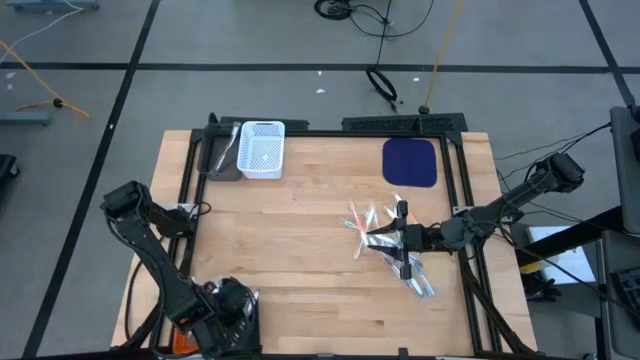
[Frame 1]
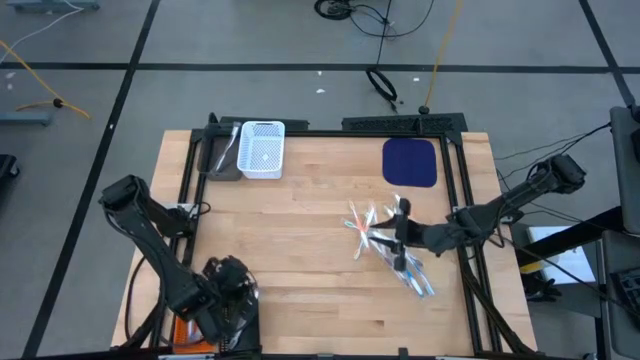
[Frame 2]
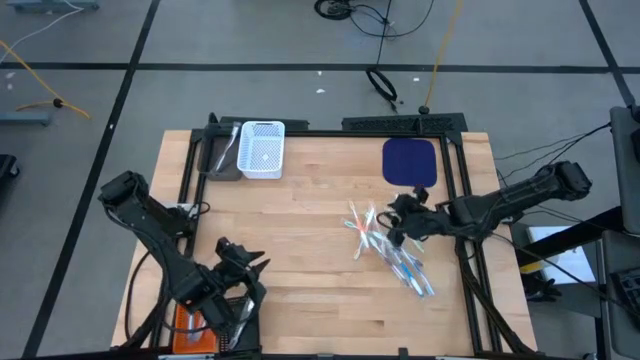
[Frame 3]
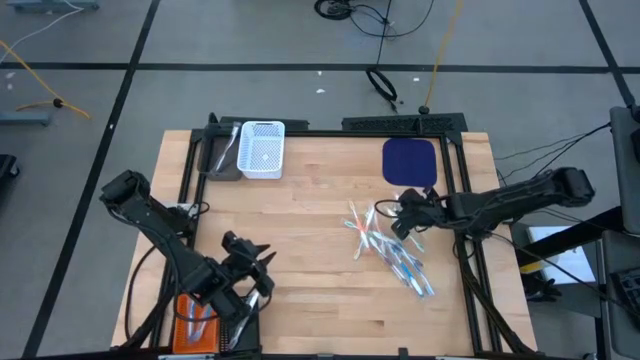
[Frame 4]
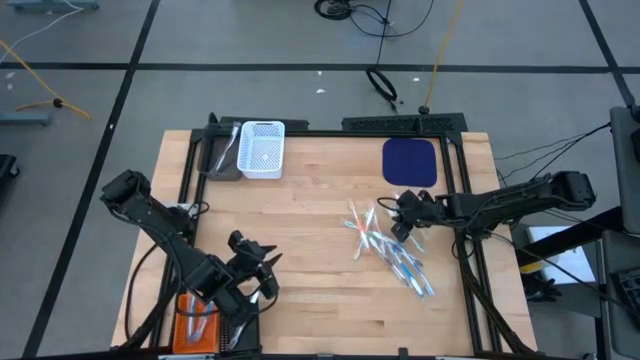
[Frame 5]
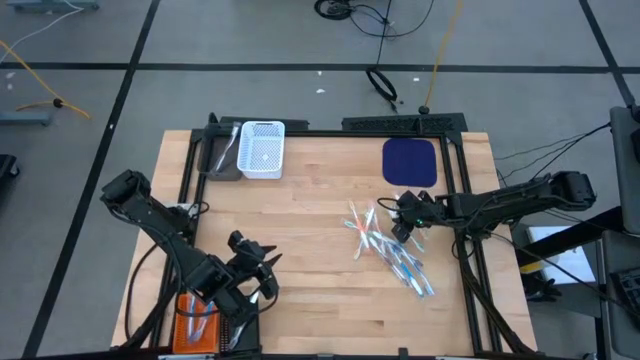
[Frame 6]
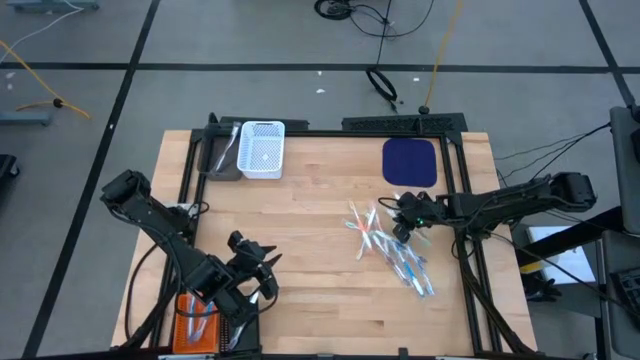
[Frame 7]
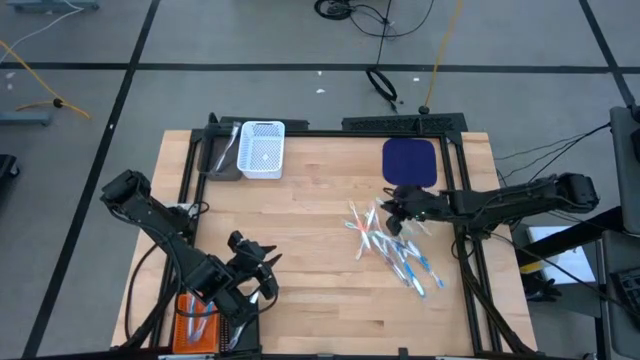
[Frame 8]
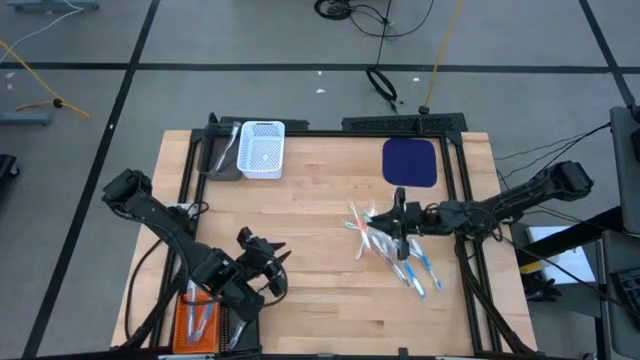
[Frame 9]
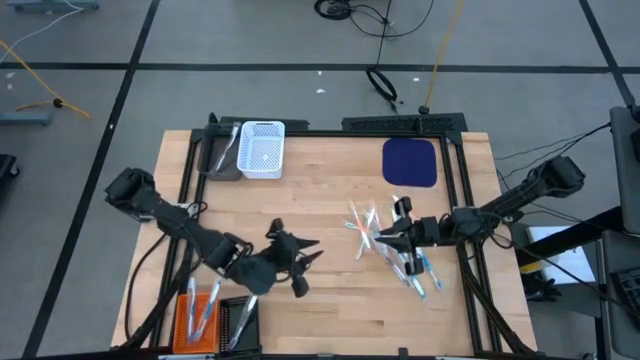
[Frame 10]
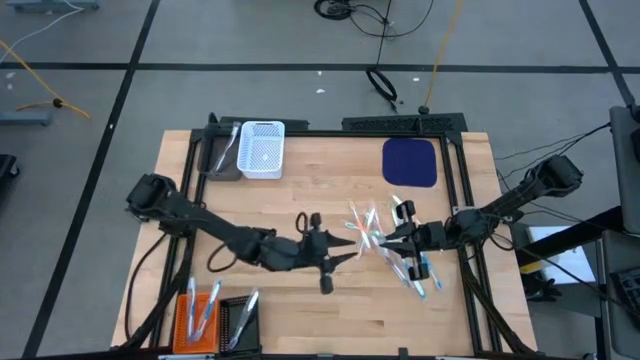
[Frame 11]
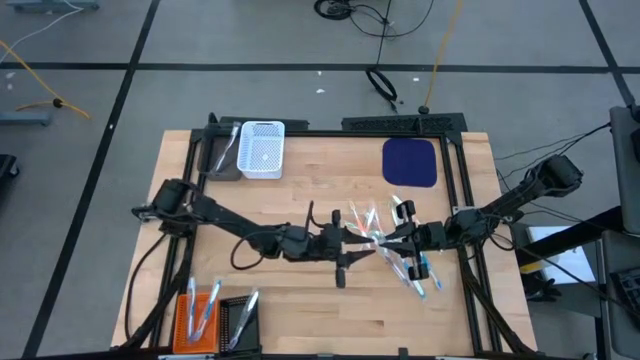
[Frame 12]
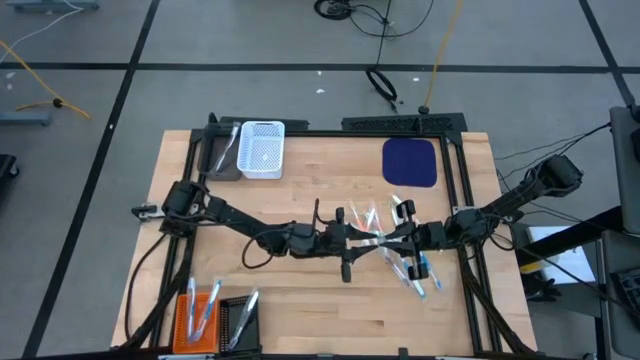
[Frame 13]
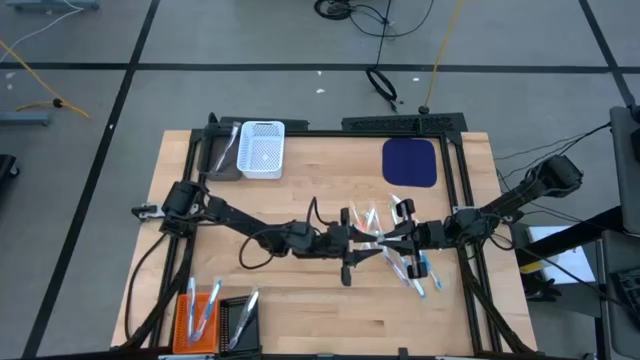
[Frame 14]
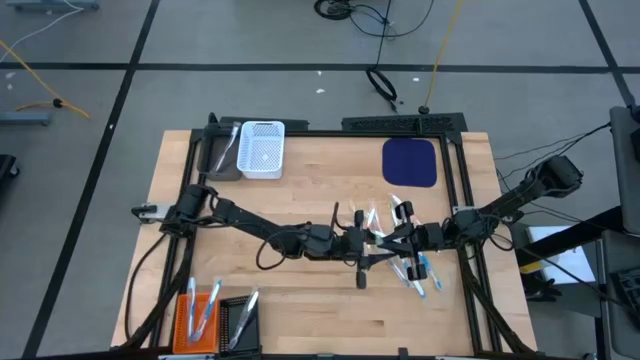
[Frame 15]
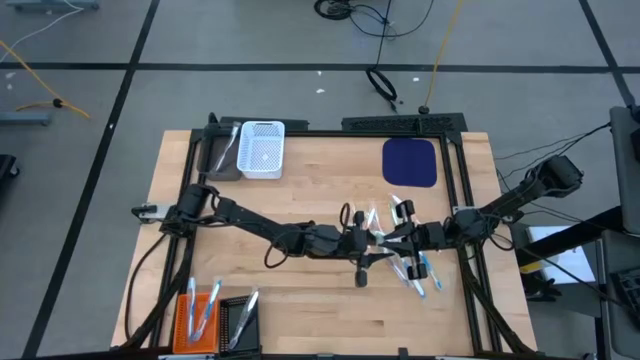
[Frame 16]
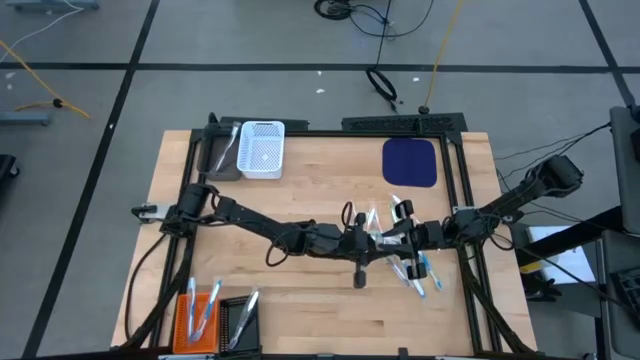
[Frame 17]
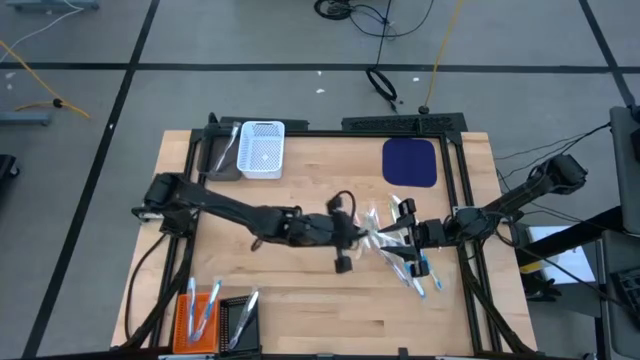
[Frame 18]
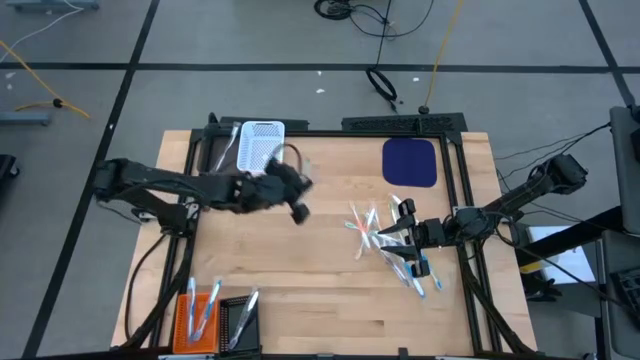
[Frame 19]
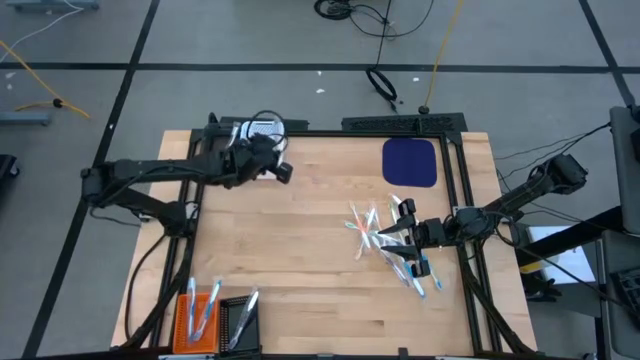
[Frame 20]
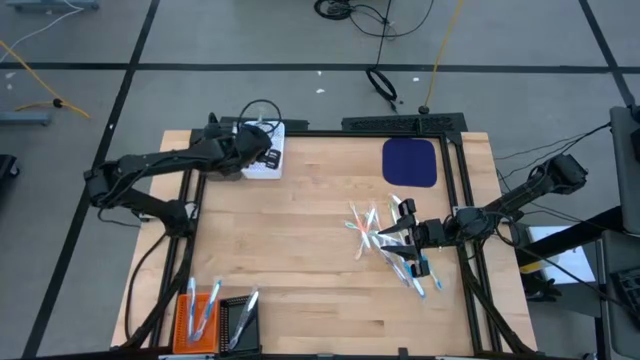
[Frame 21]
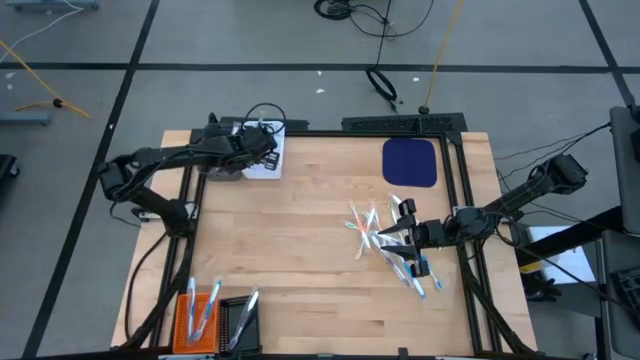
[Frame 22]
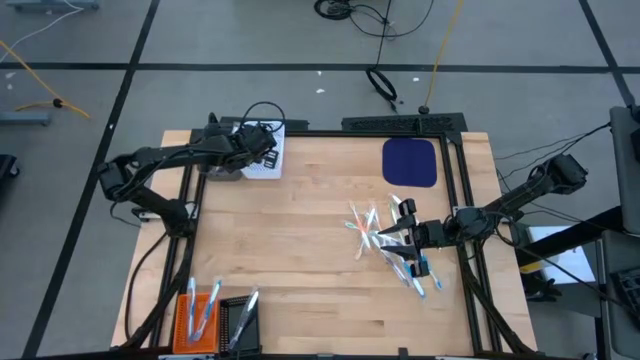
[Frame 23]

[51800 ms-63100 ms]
Task: Pick & Place Toothbrushes
Put the green toothbrush into the white bin

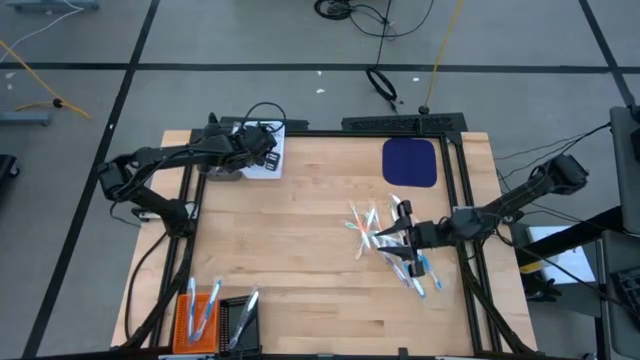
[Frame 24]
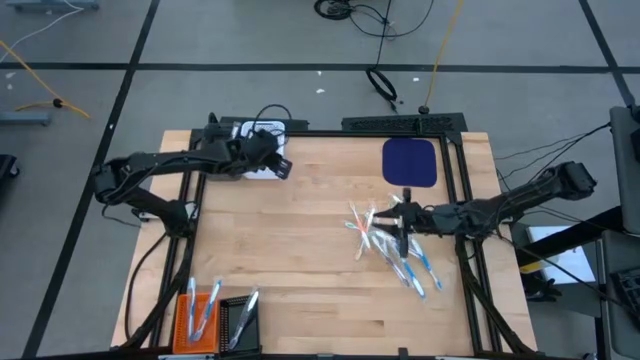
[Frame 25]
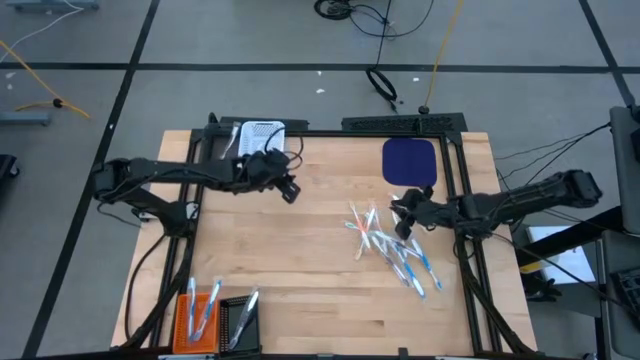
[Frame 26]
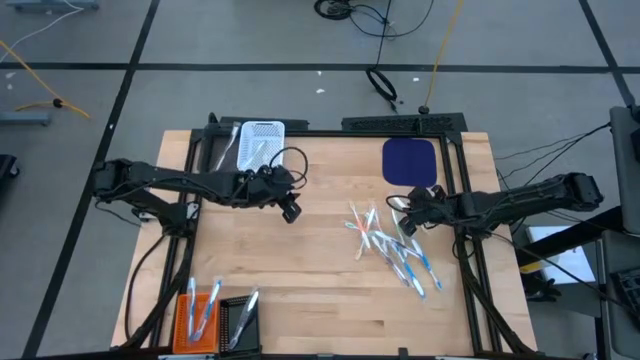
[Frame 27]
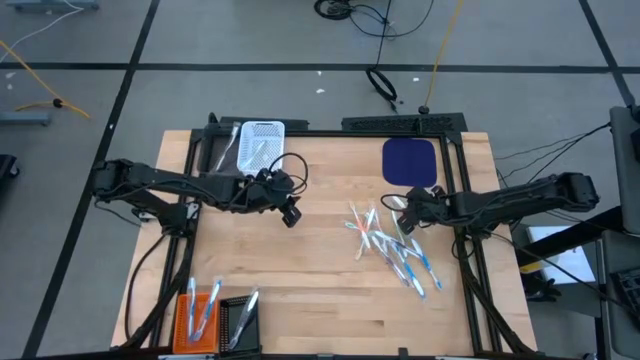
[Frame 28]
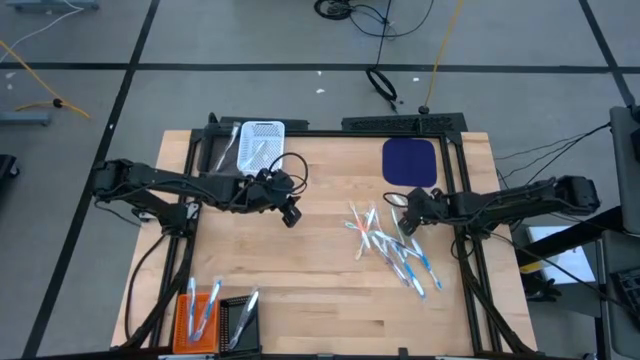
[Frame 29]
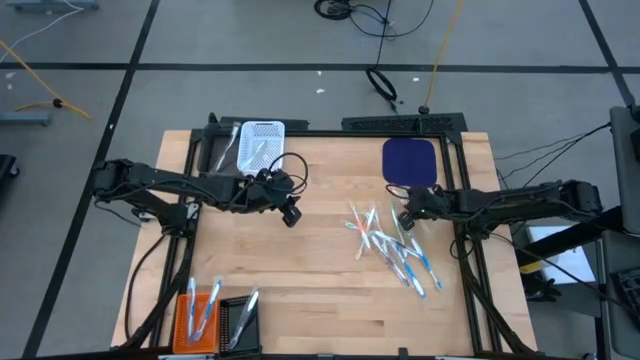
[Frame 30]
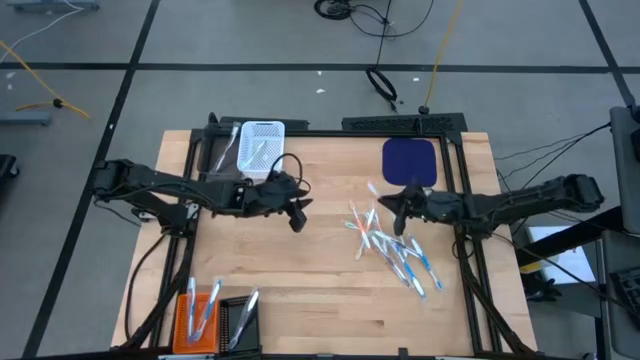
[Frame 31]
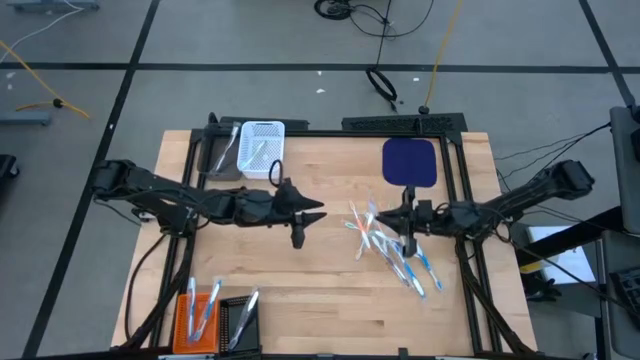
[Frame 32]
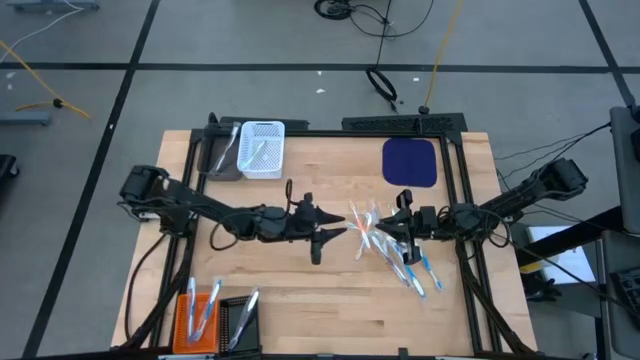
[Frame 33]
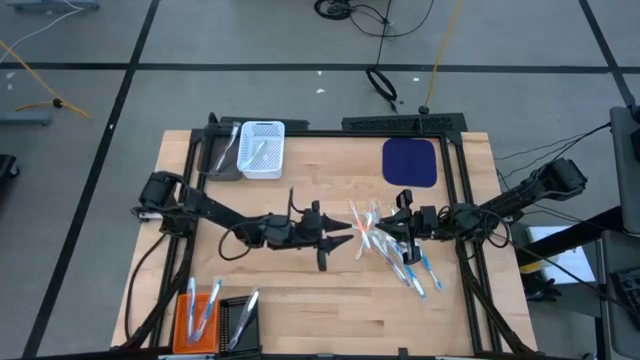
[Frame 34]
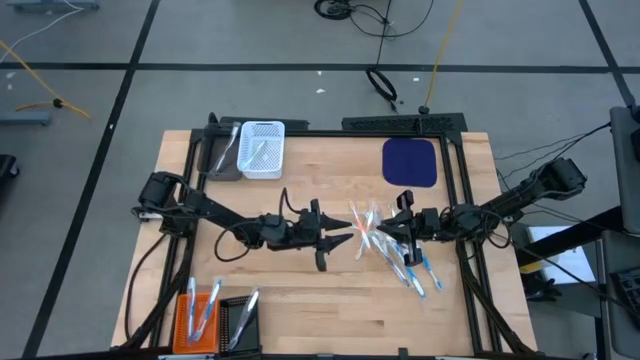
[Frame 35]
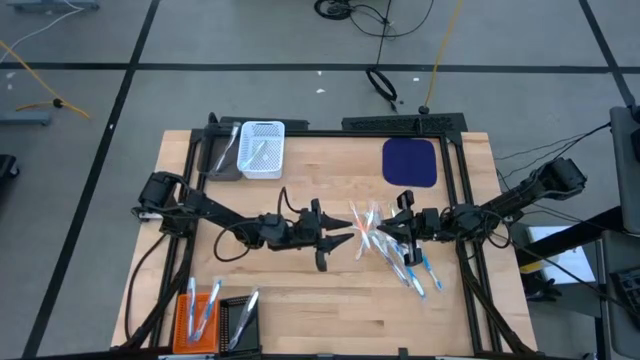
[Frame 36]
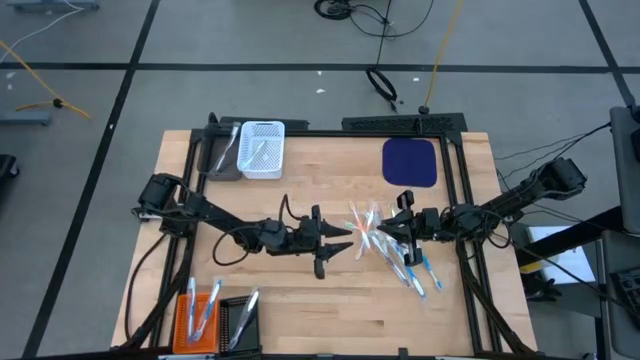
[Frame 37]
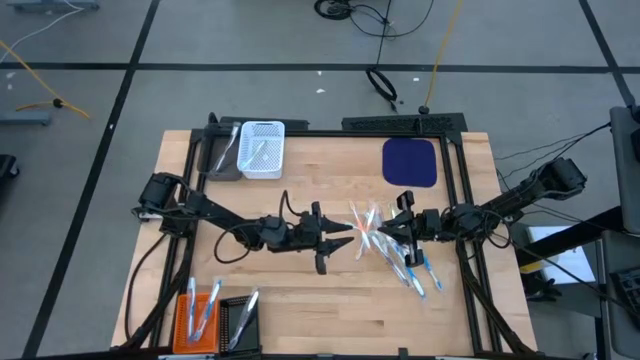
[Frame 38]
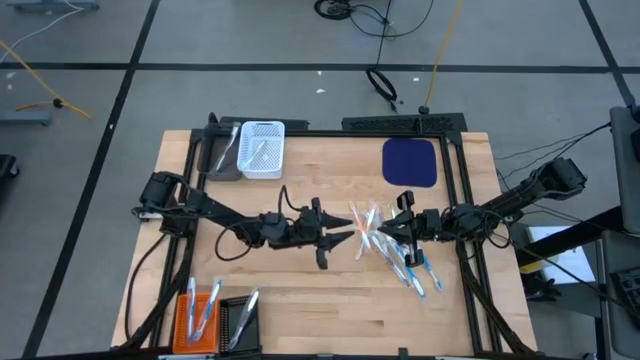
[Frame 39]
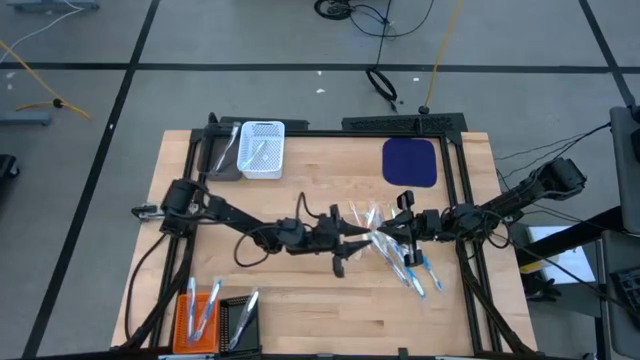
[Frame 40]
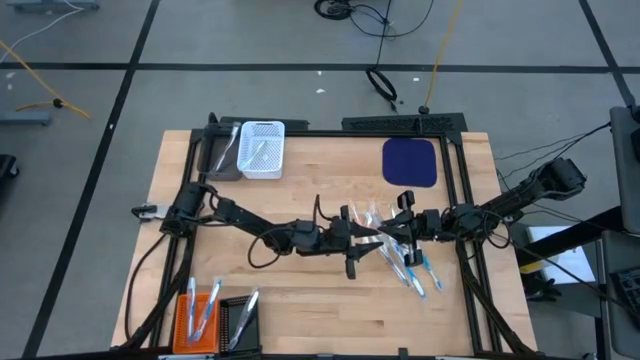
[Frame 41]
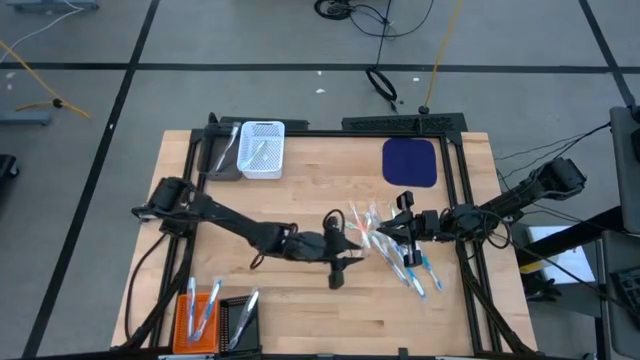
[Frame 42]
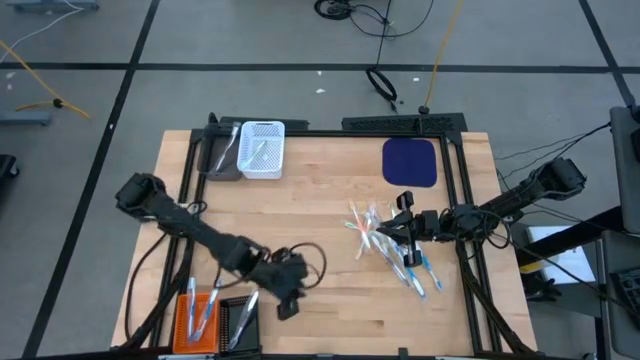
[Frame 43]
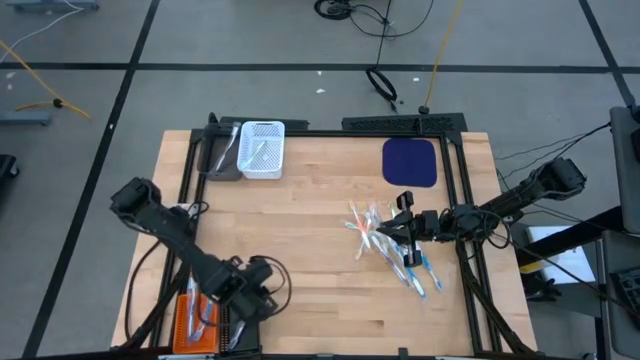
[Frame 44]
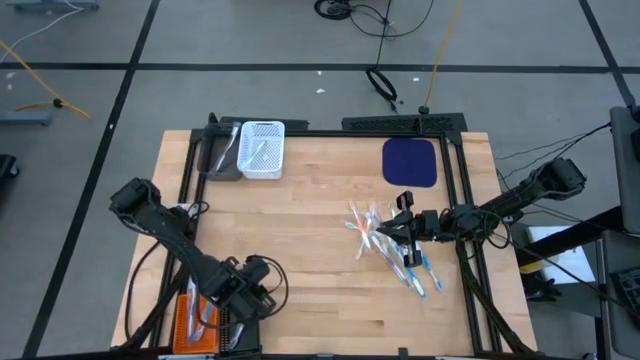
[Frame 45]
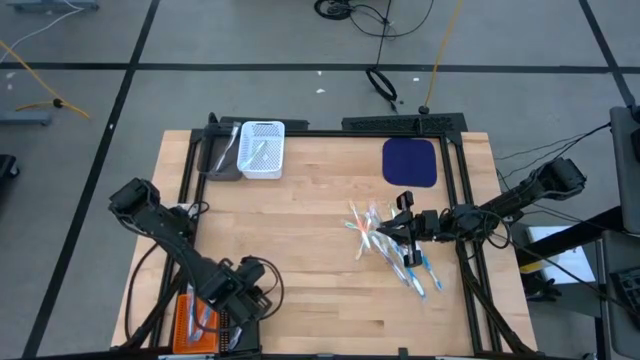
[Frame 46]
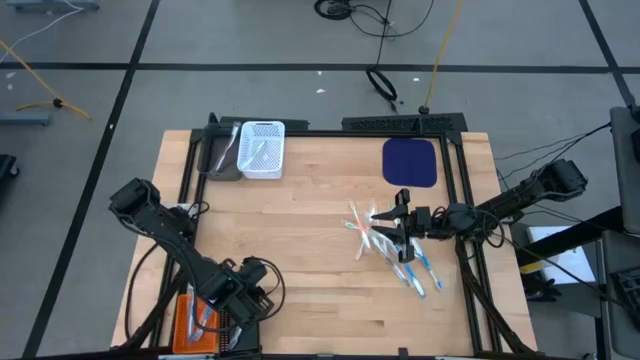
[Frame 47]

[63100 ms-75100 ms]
Put the orange toothbrush into the black bin
